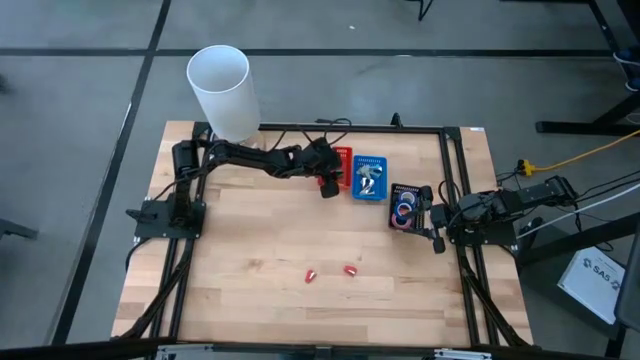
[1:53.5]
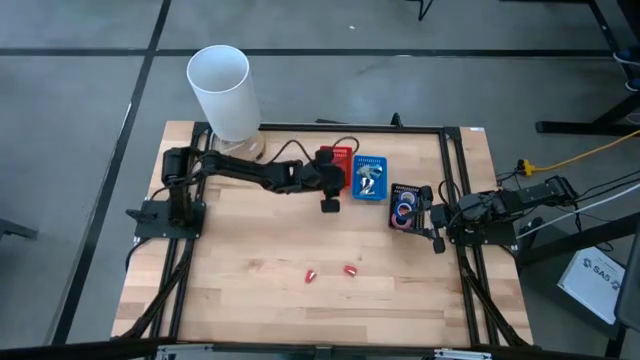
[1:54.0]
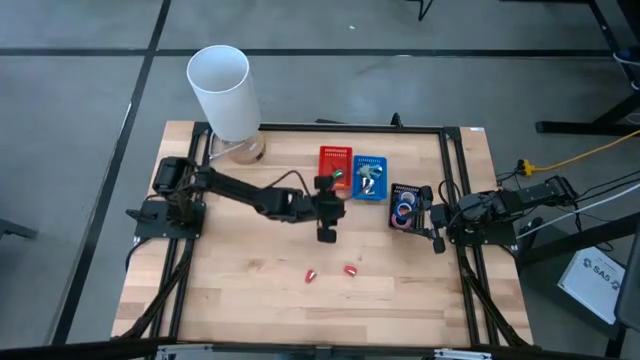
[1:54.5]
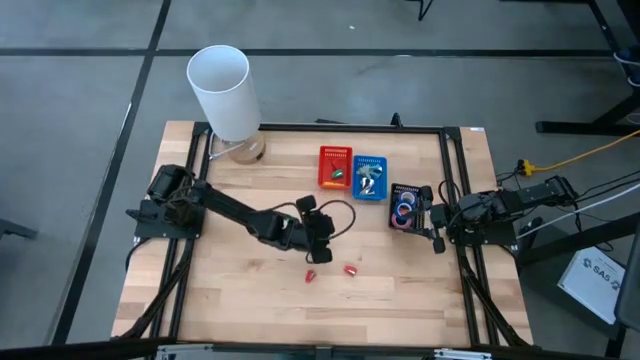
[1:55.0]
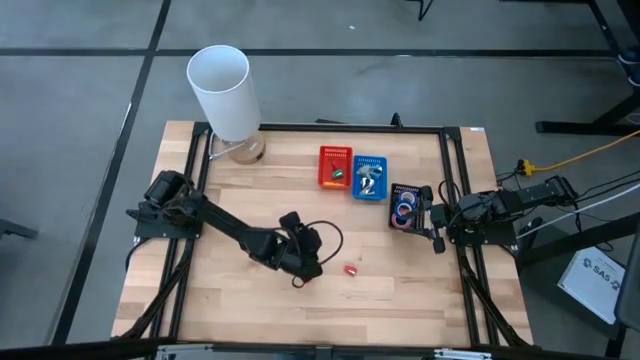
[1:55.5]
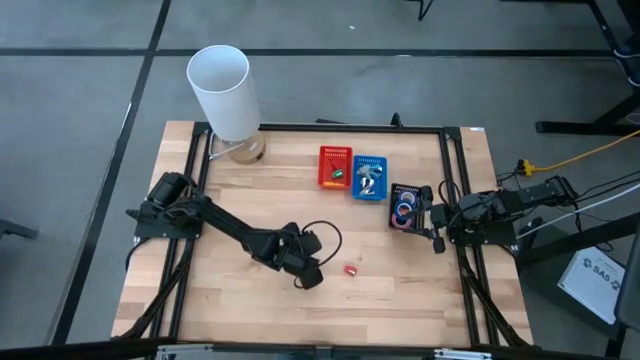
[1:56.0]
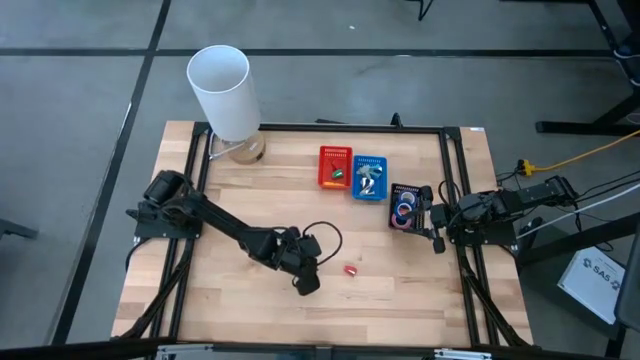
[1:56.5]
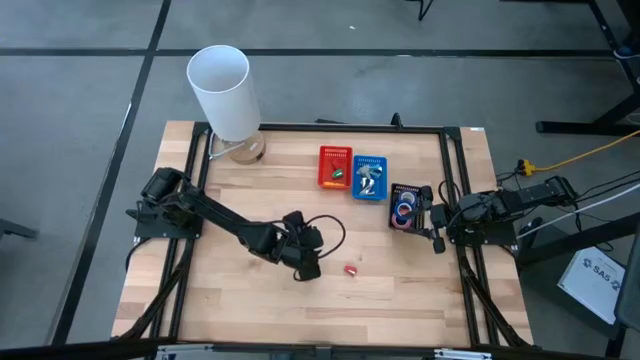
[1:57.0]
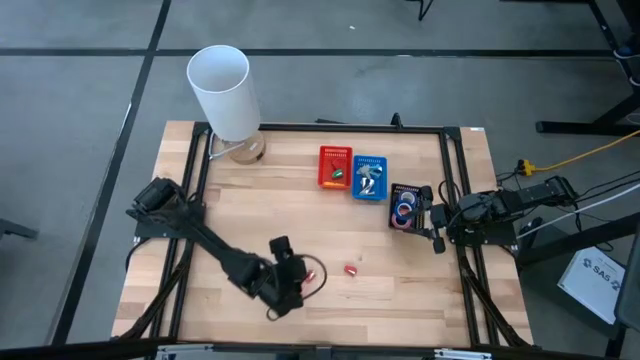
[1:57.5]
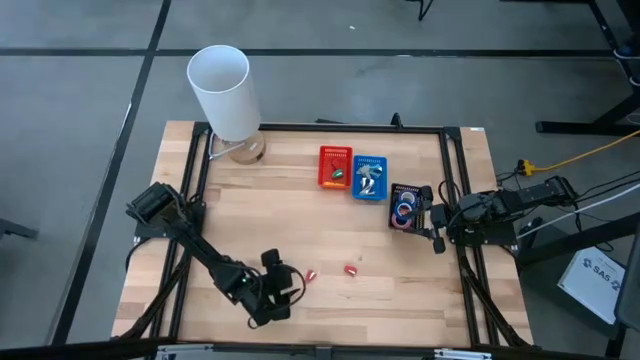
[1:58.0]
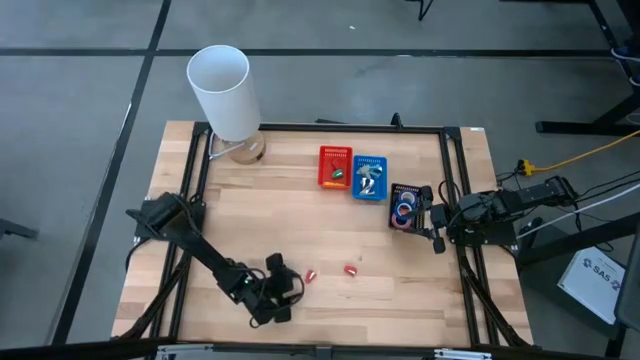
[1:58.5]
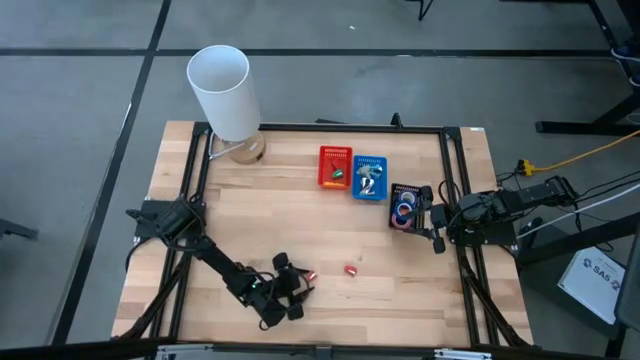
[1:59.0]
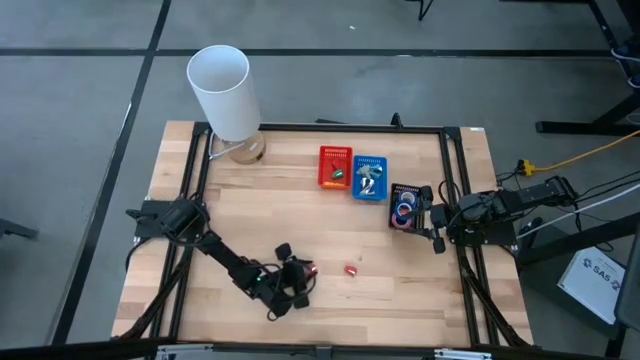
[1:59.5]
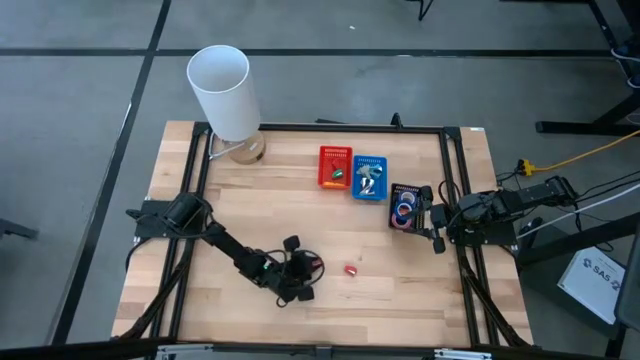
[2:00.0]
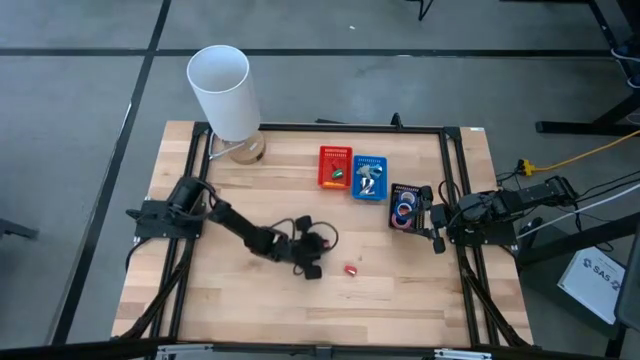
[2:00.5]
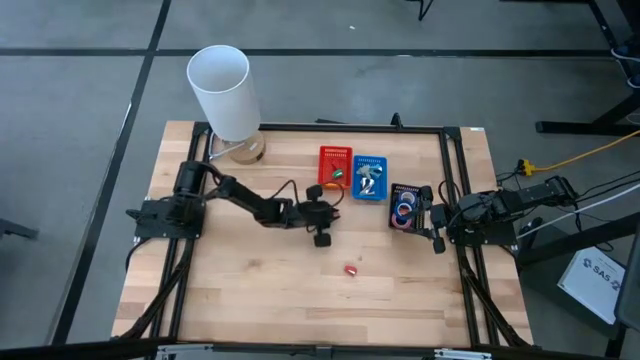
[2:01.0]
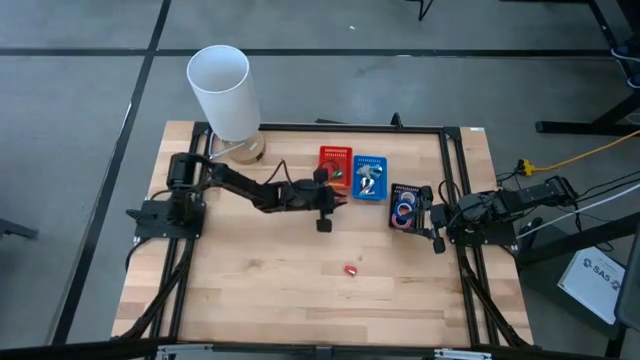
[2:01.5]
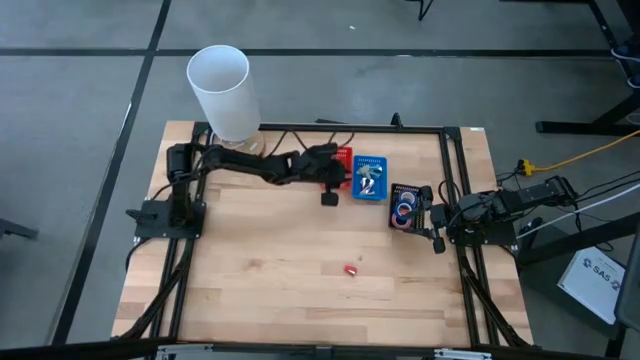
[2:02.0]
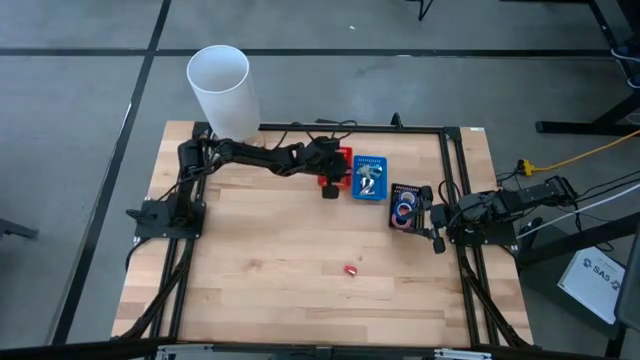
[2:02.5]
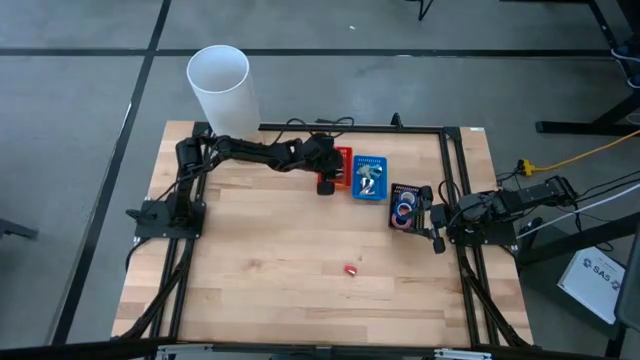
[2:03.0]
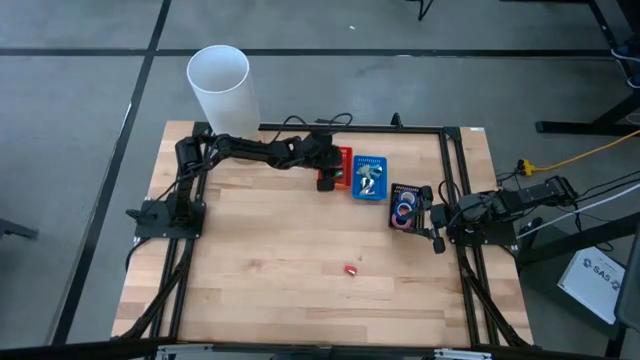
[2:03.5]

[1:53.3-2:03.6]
Task: Pick and place Stapler, Stapler remover, tape
Put the left red mini-stapler into the red bin

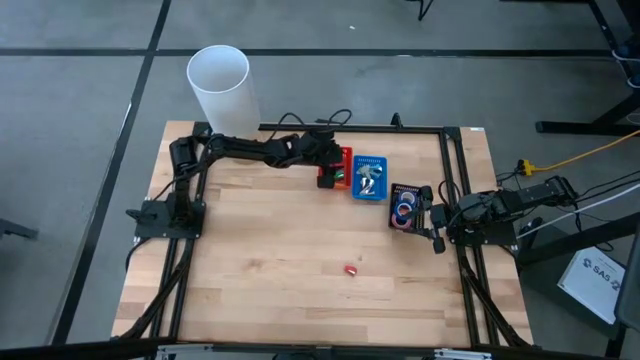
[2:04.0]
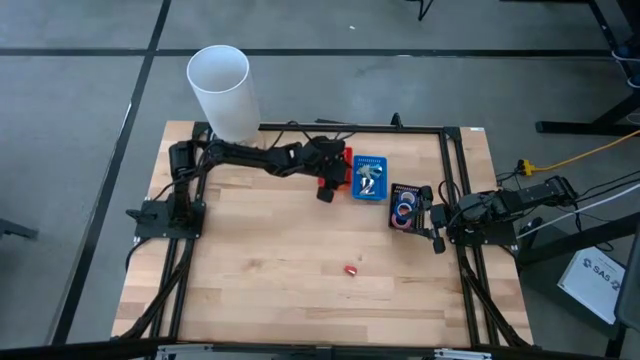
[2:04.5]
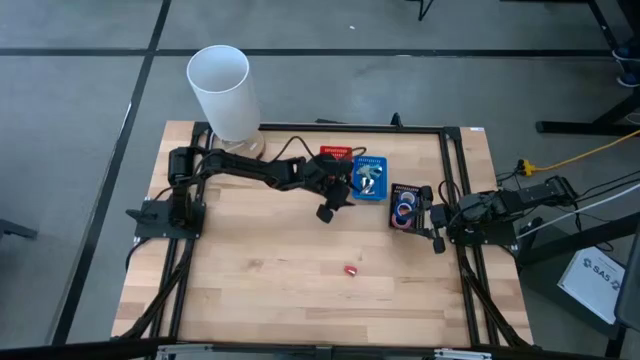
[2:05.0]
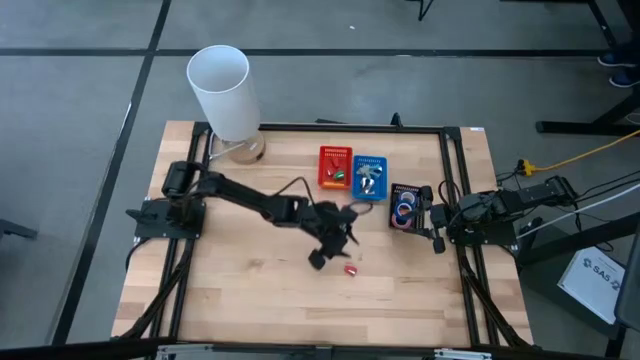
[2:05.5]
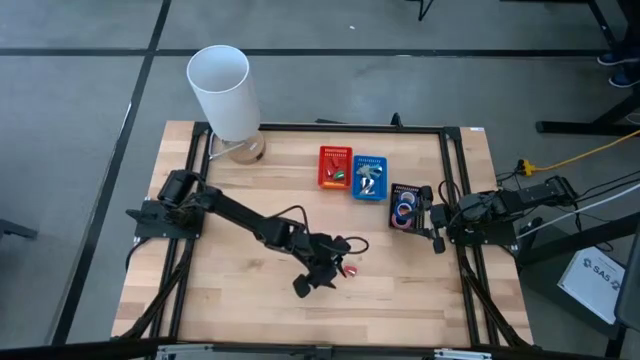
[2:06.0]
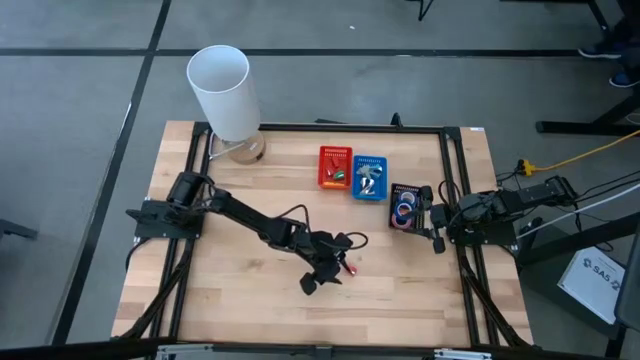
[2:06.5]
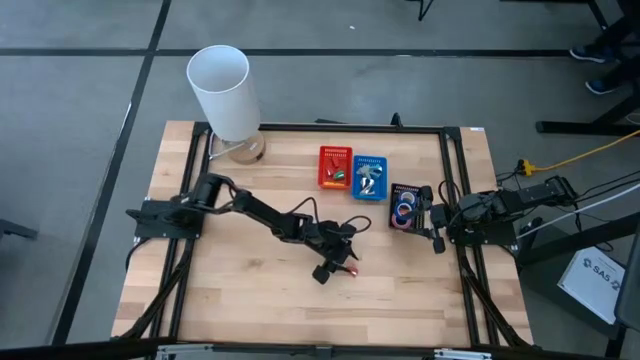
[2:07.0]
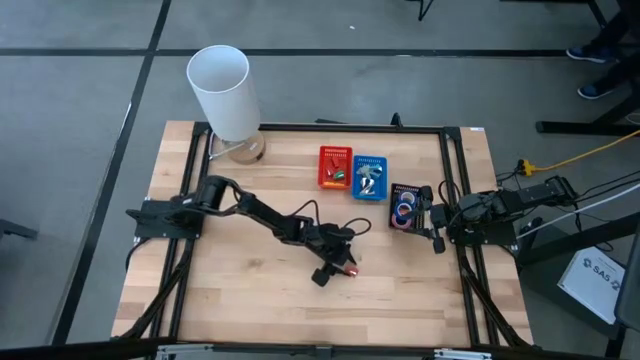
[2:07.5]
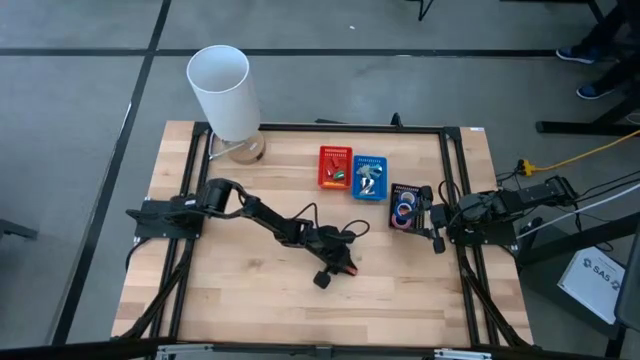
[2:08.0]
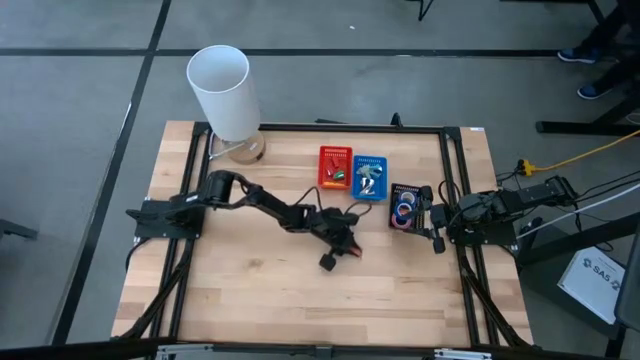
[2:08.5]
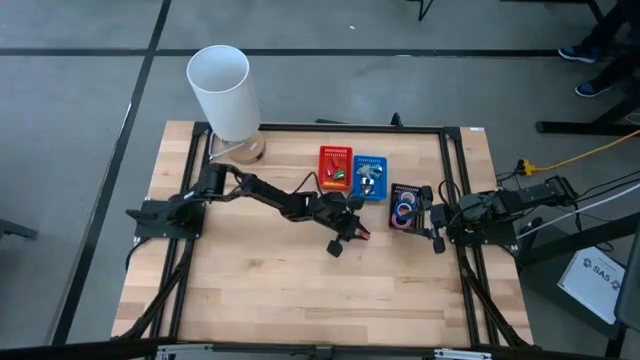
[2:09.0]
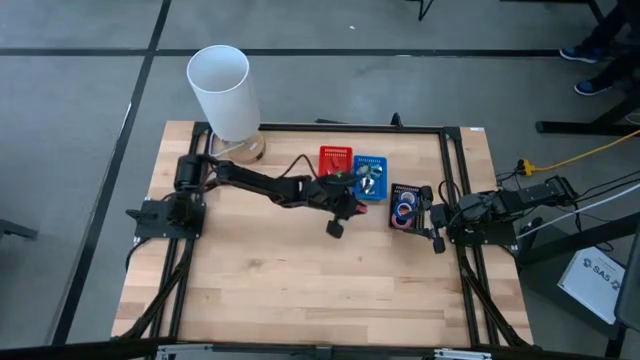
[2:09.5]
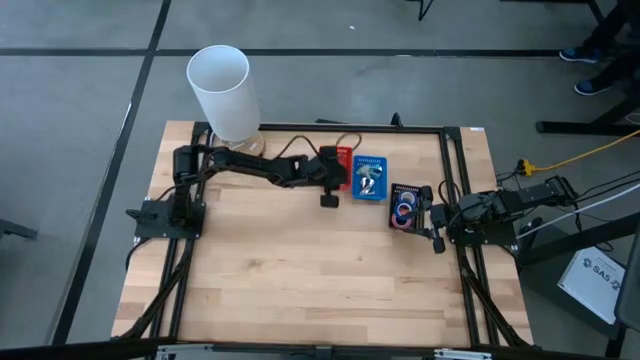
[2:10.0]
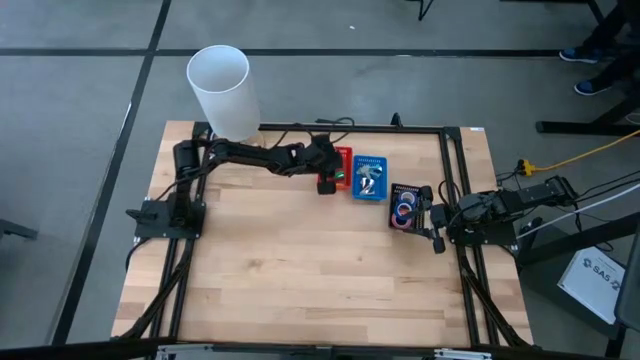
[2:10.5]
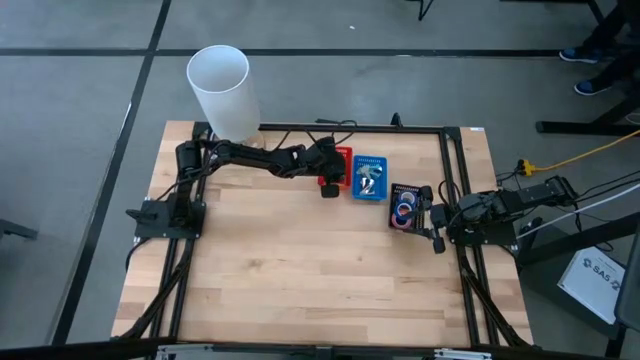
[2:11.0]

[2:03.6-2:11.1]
Put the red mini-stapler into the red bin
